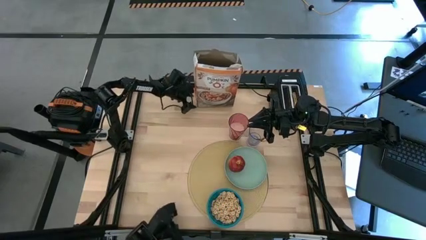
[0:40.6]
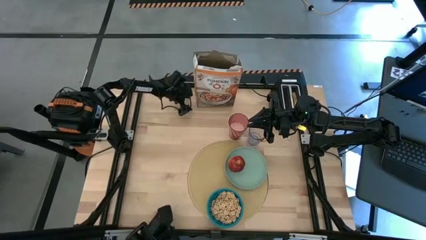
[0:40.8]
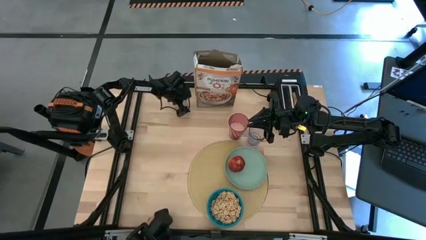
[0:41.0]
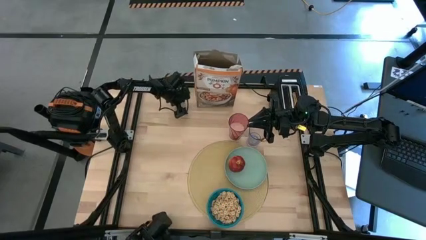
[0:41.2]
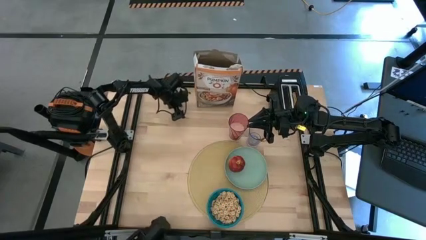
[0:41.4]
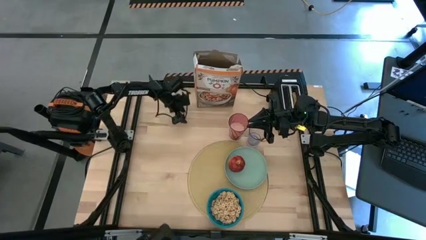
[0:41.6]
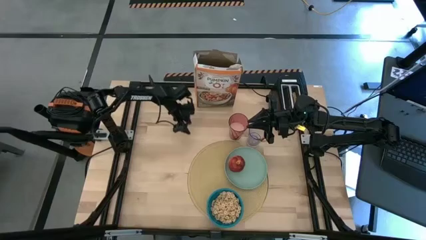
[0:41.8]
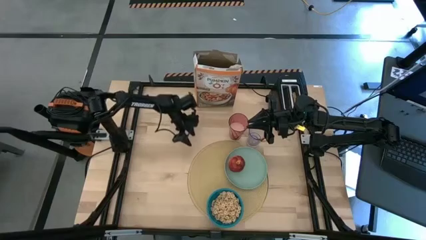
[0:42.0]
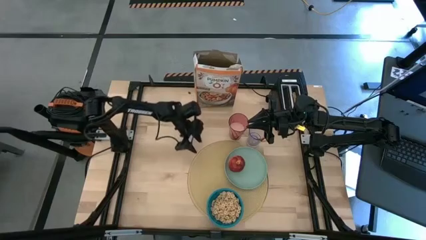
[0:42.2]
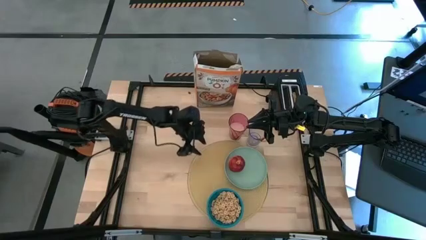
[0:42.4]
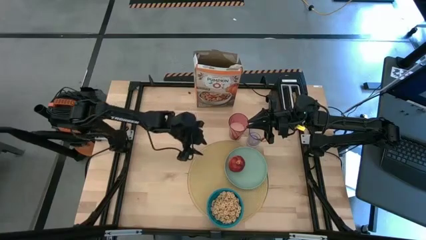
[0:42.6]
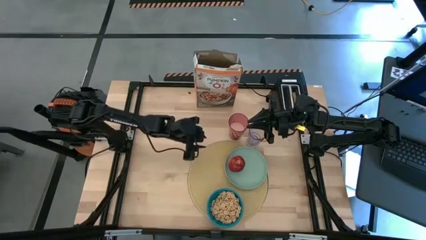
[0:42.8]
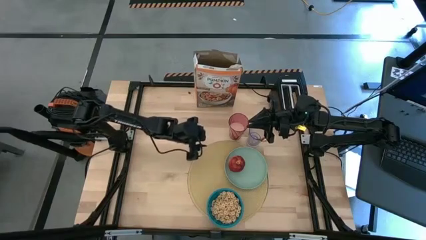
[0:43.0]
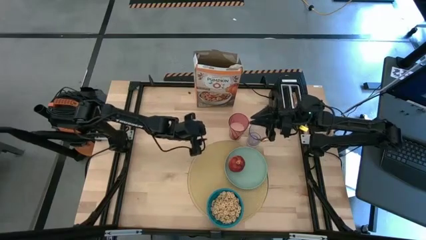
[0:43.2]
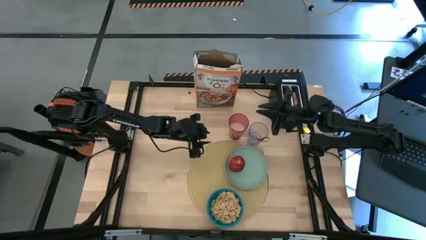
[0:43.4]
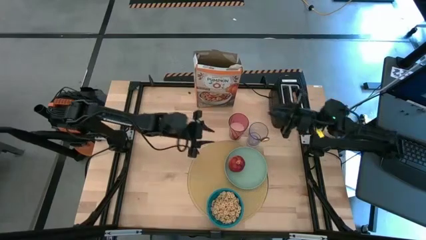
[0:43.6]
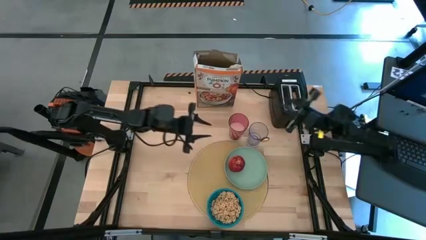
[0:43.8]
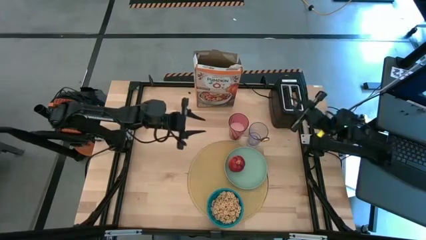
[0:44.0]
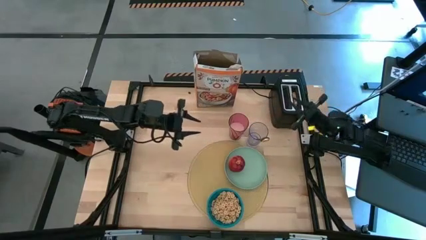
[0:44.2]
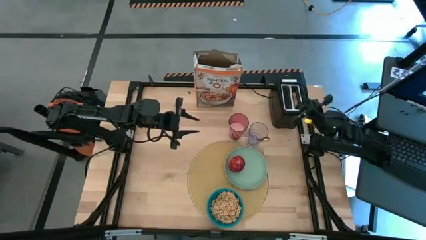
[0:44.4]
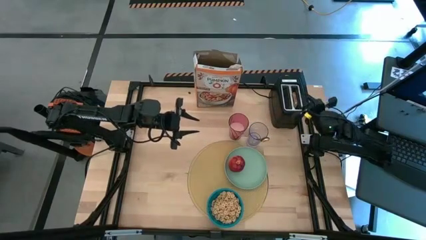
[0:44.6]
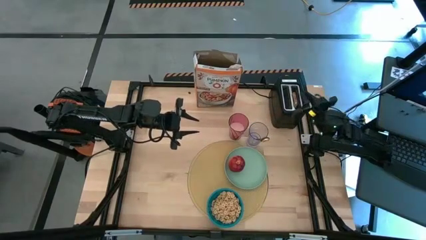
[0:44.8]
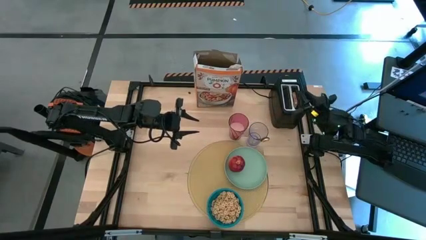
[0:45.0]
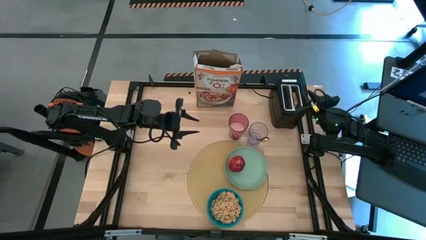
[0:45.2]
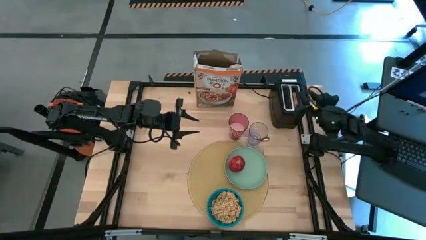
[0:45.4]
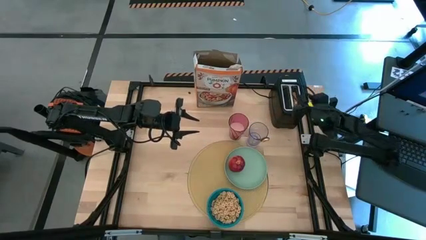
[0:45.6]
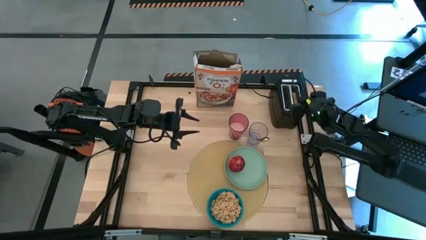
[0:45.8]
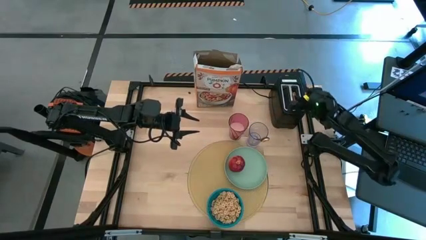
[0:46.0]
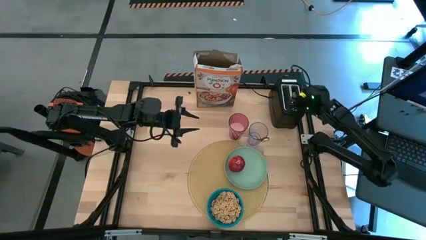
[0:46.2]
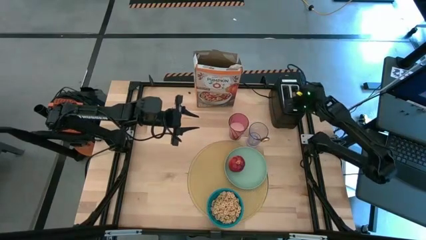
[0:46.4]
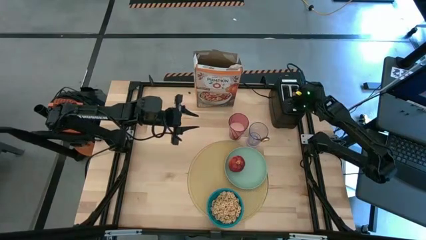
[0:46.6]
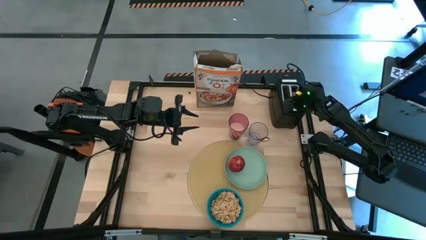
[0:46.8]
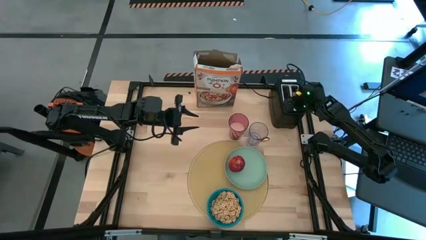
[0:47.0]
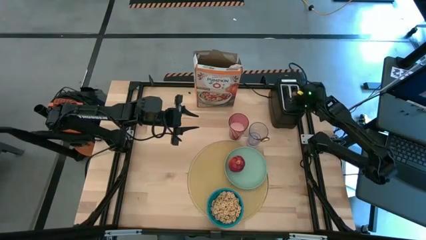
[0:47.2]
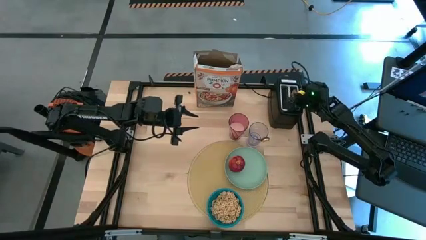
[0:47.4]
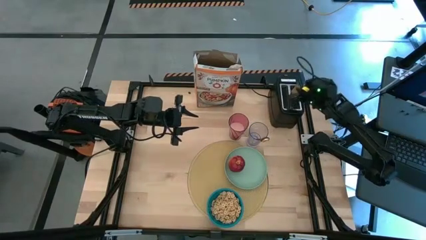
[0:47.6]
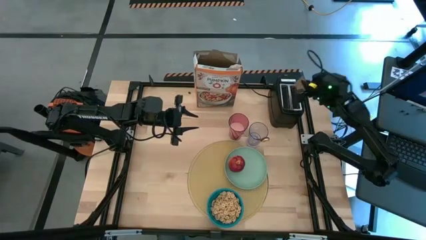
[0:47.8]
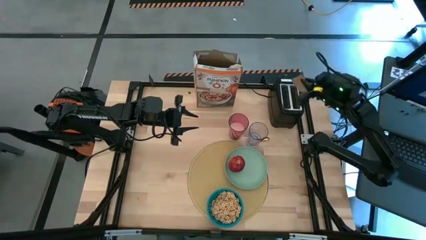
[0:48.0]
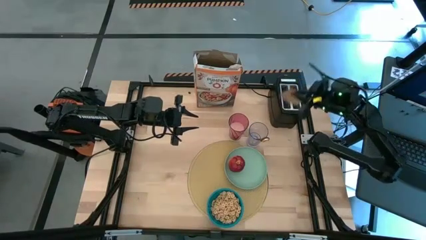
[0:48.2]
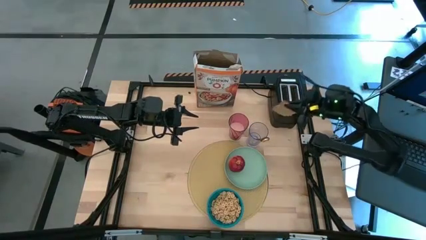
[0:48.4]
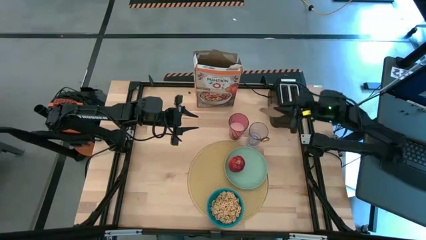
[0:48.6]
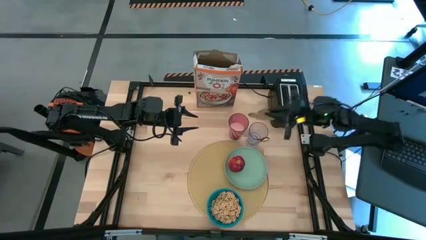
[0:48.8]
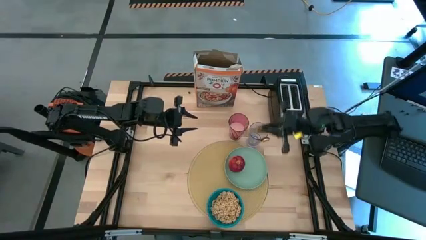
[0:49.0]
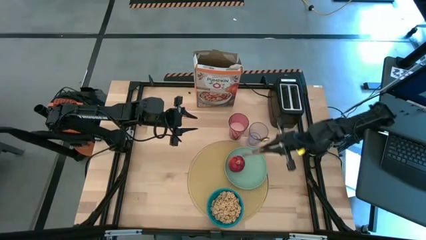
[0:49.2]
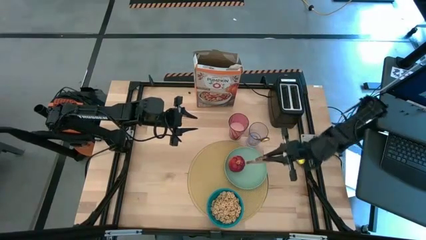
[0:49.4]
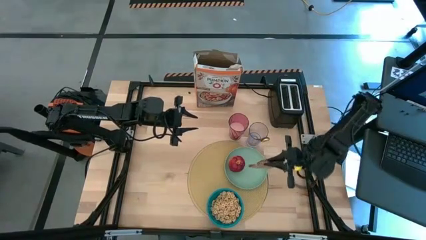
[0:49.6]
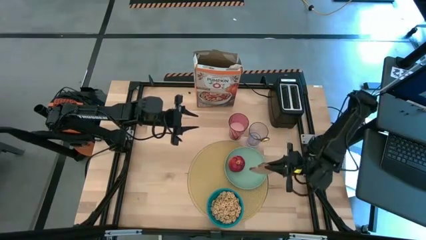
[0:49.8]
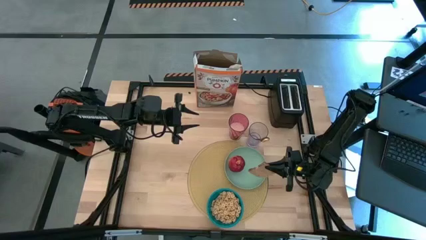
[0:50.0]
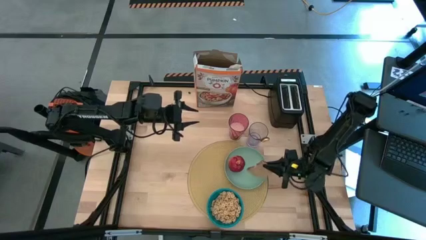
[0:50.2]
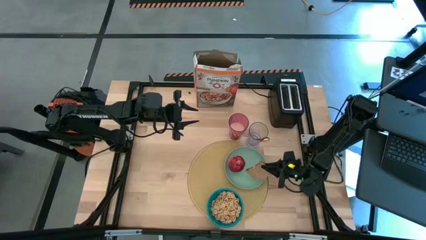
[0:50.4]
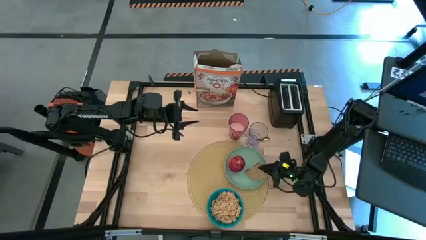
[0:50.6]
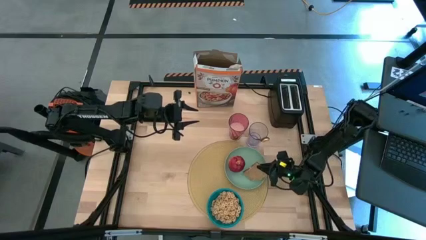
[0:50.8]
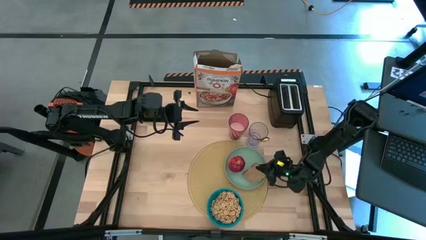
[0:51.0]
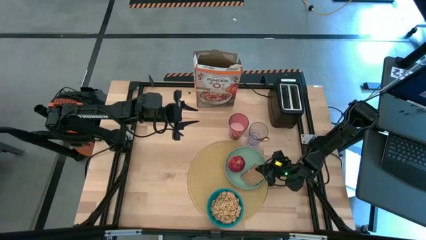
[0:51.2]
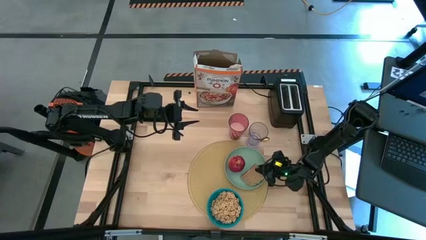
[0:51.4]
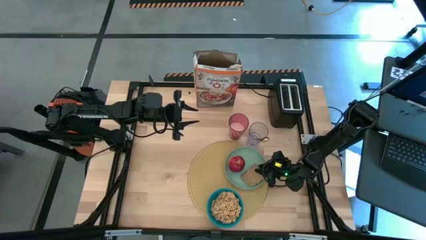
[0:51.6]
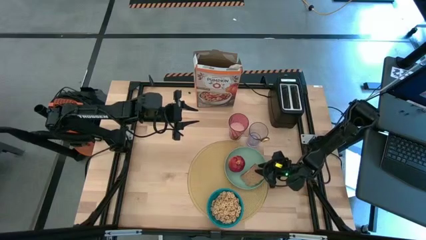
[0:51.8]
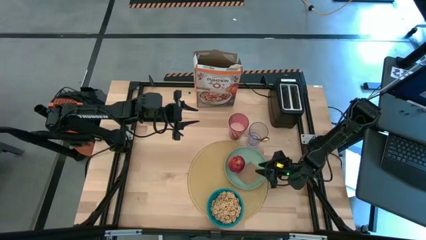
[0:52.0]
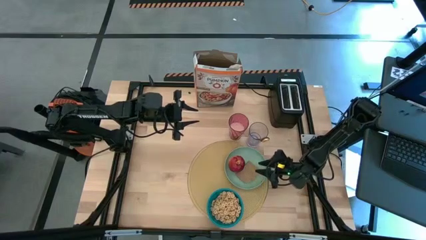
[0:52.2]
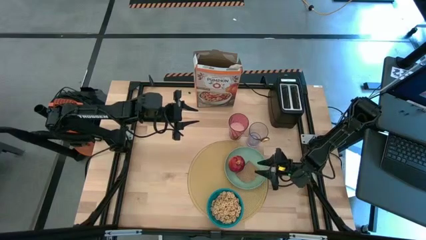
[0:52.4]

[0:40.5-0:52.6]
Task: Arrange a breakfast setting
Put the toast bread on the green plate

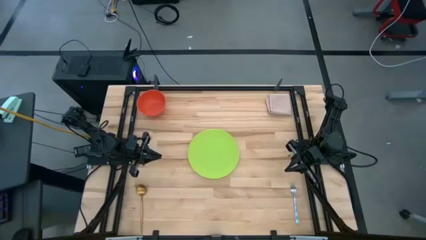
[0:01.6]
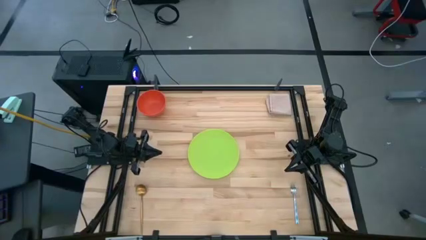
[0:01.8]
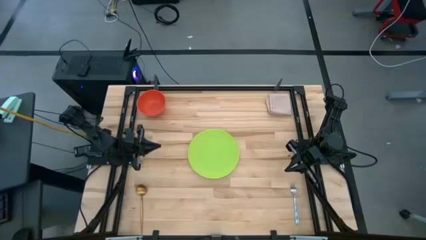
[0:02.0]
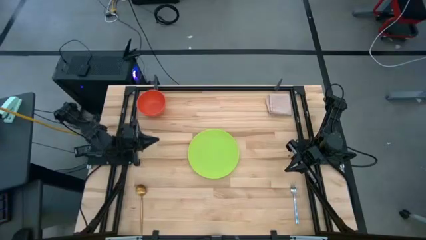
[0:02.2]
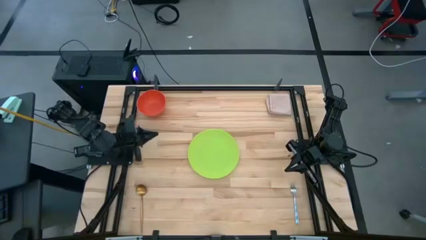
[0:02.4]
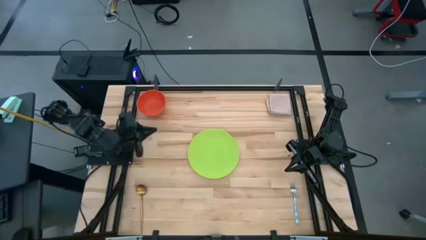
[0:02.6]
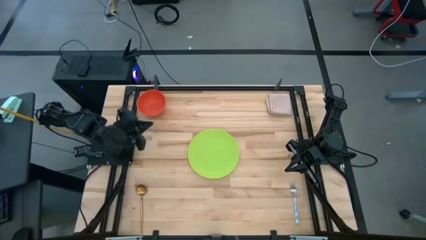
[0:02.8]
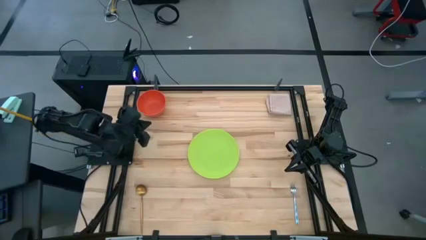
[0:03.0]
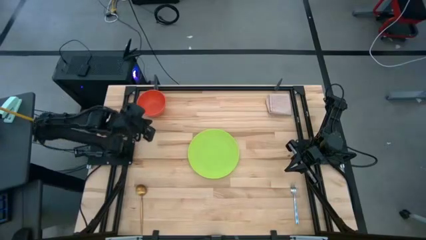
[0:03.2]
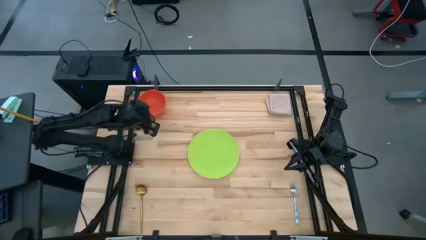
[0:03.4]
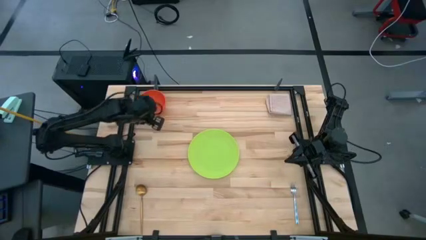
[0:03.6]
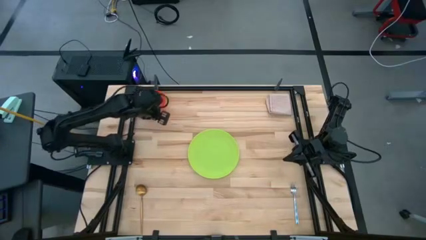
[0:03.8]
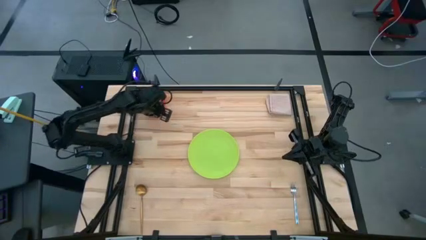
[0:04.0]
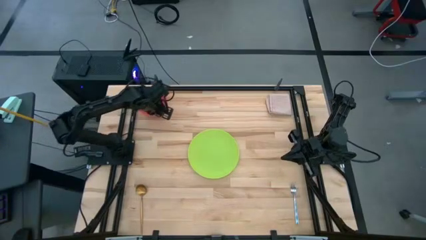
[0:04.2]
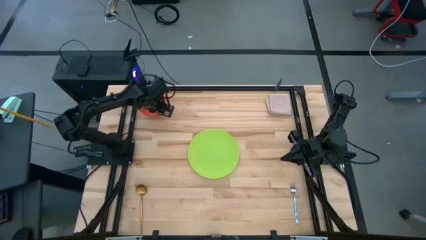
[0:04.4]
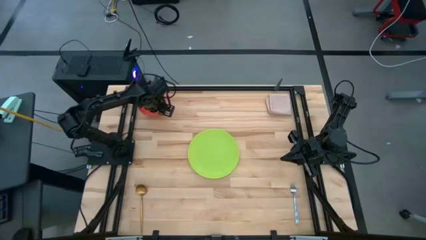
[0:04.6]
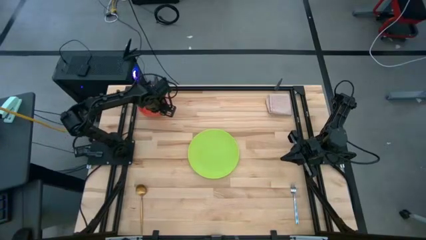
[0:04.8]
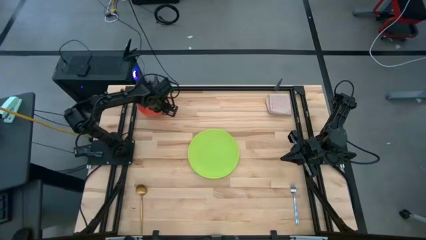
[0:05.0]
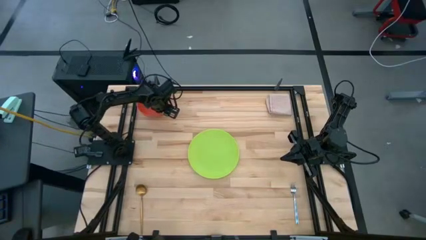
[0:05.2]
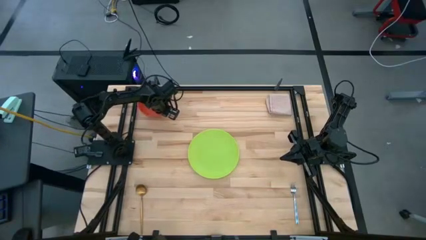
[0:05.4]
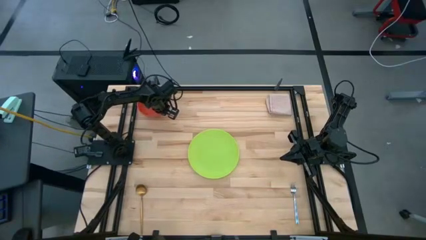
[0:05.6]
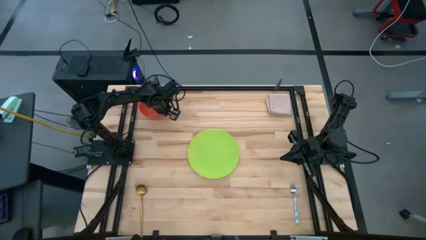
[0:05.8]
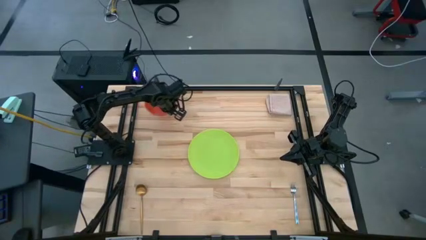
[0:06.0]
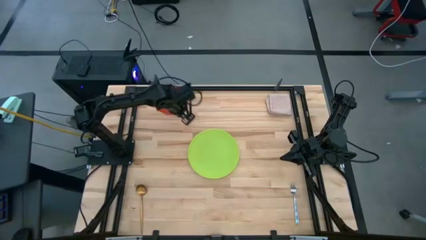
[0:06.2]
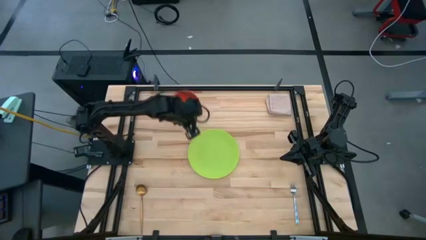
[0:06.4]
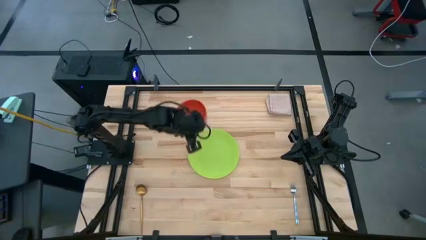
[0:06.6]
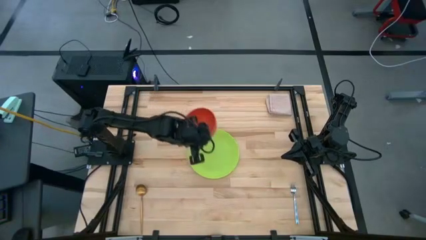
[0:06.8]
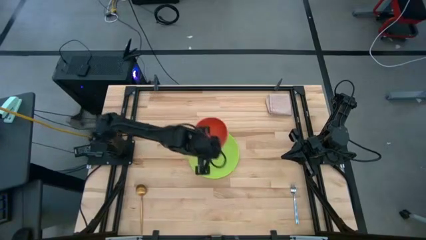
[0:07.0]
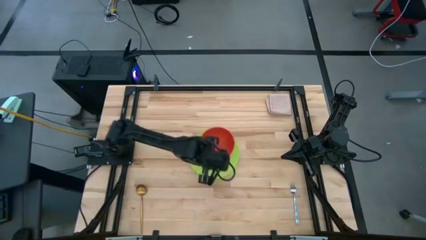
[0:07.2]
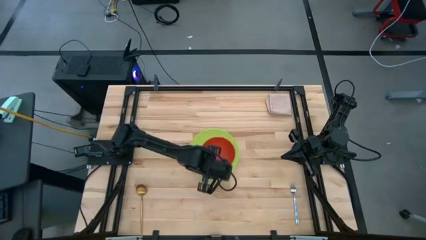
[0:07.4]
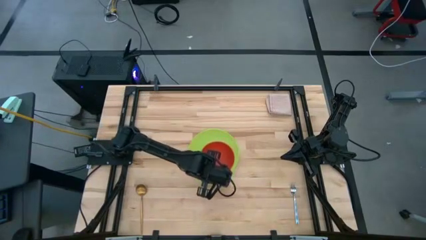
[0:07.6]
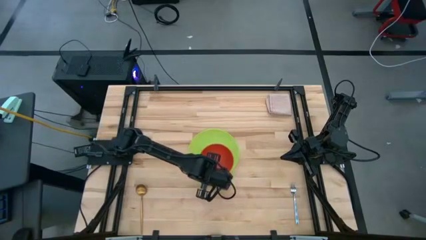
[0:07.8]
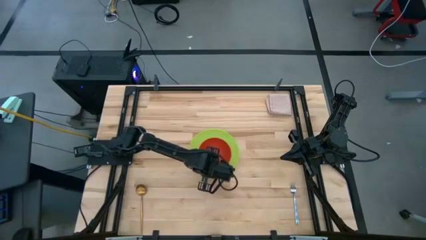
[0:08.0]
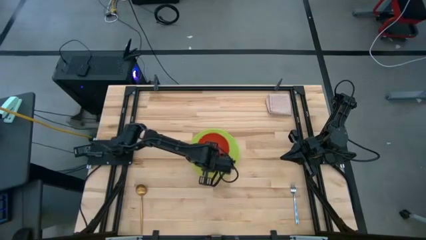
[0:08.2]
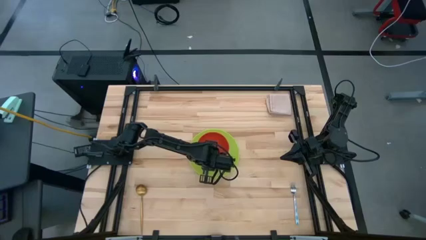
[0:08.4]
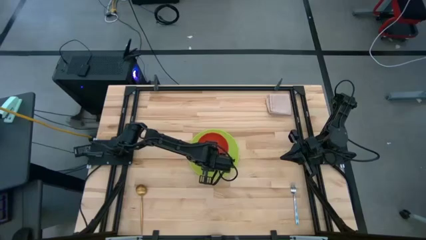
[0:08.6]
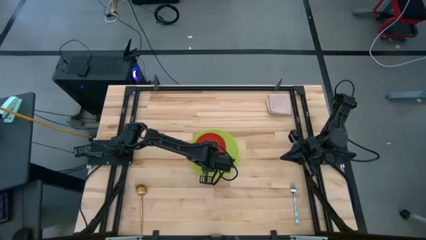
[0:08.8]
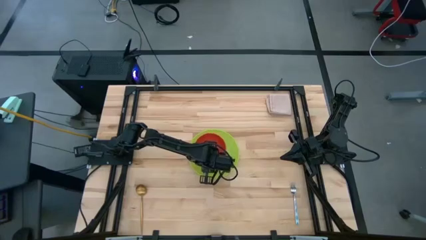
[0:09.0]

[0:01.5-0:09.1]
Task: Pick and place plate/cup/fork/spoon on tray
Put the orange bowl on the green plate
